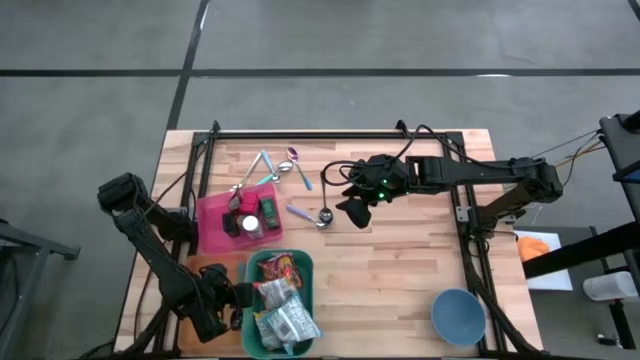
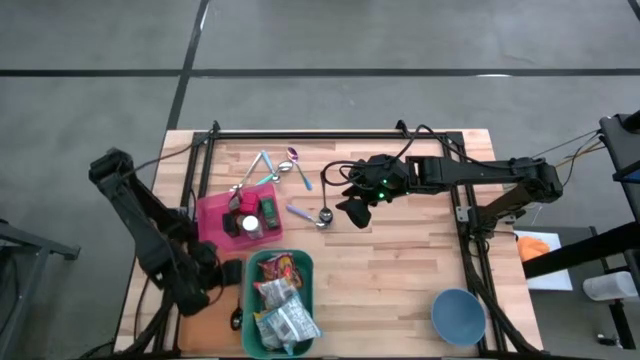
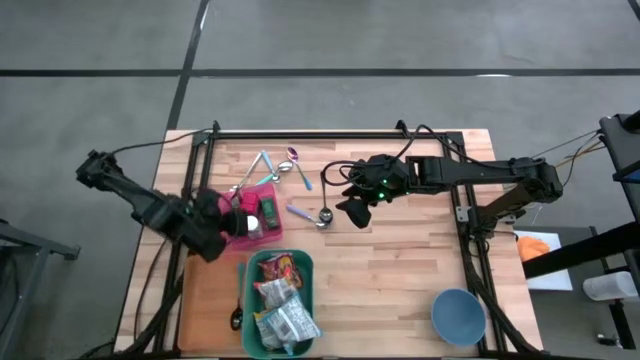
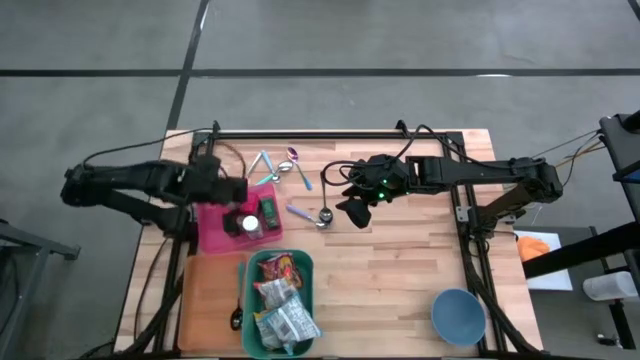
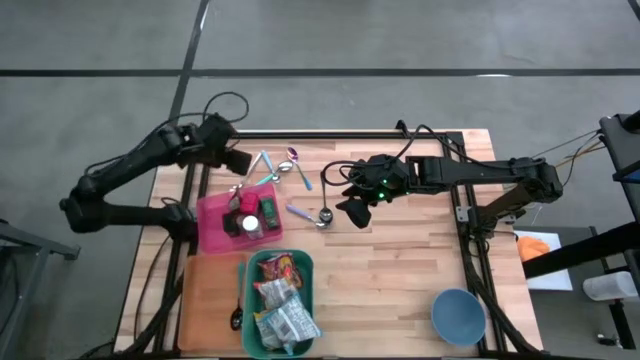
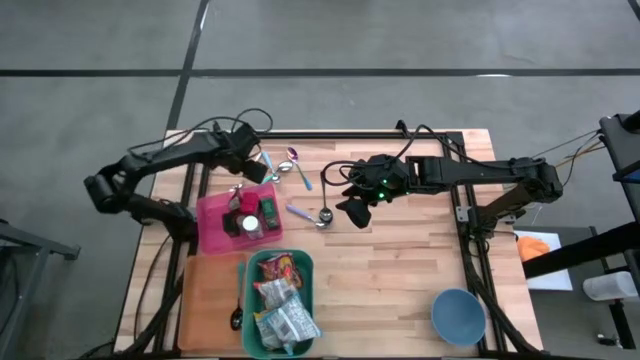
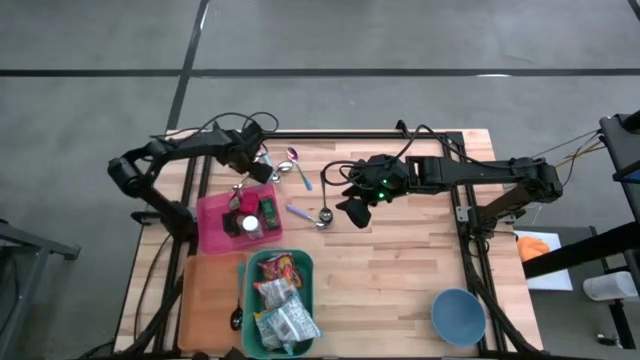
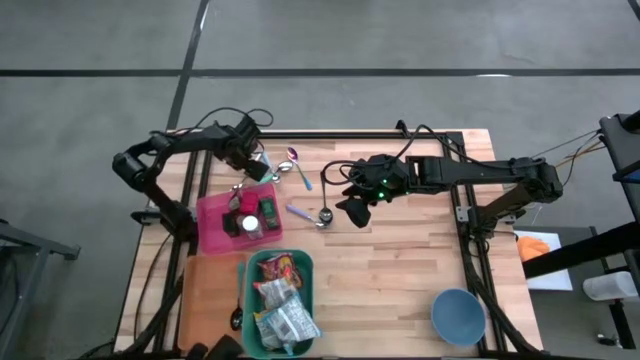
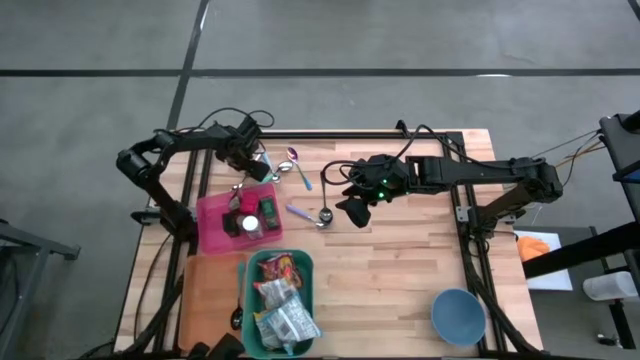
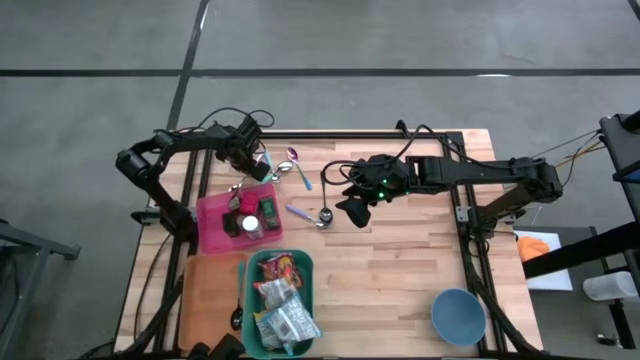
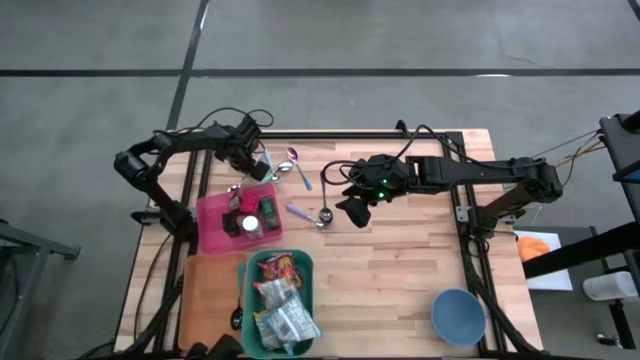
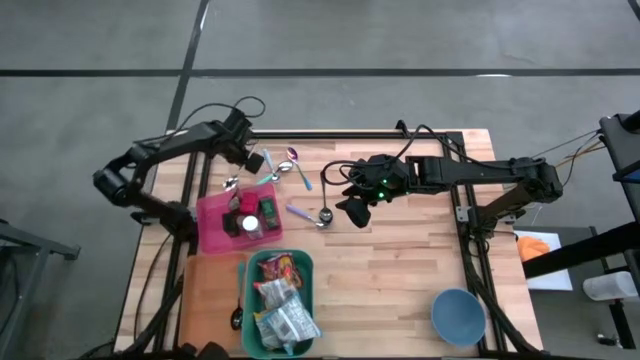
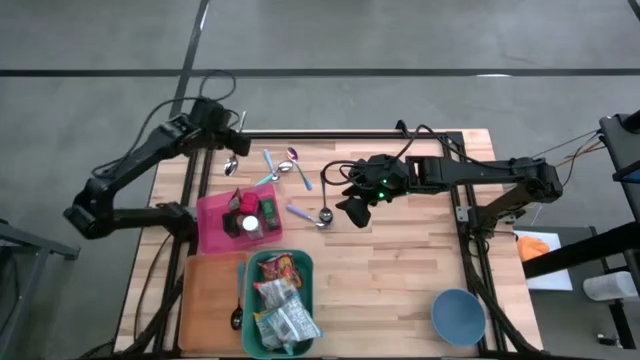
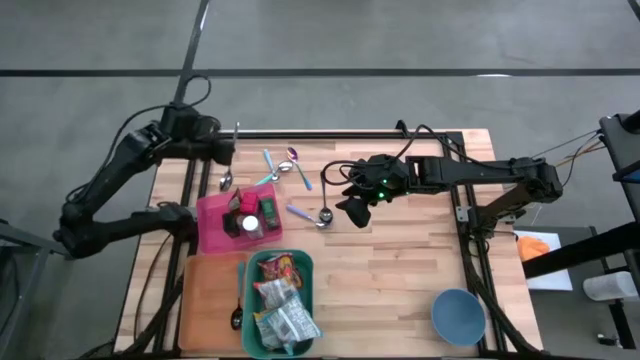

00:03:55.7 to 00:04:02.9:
Put the silver spoon into the orange bin
